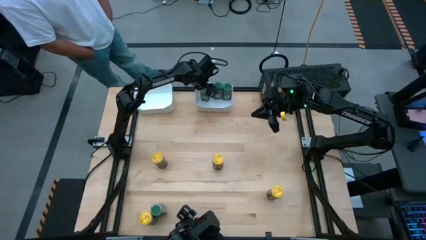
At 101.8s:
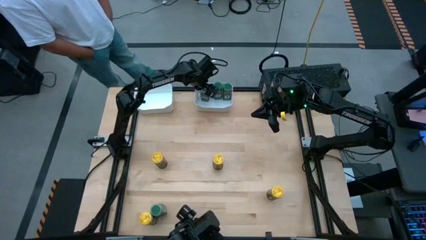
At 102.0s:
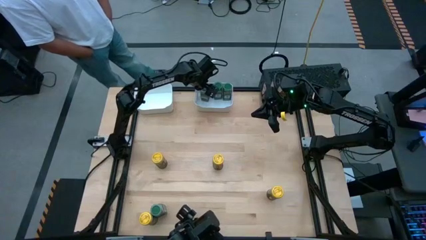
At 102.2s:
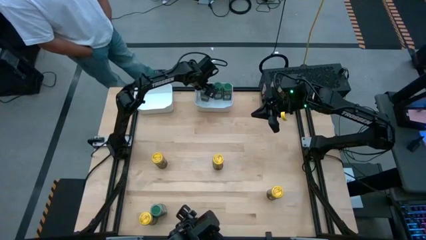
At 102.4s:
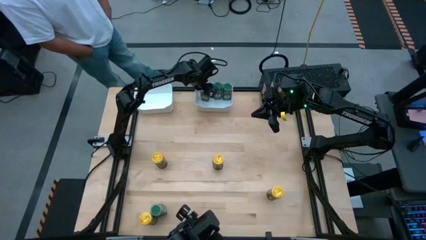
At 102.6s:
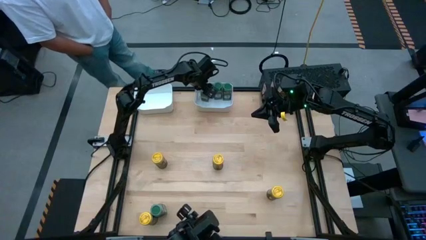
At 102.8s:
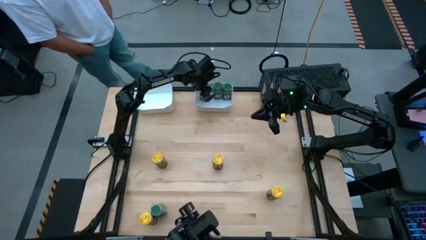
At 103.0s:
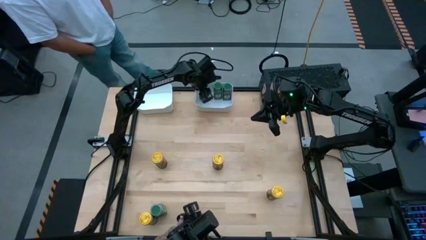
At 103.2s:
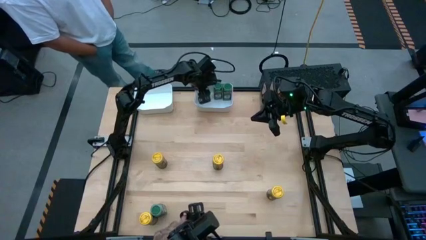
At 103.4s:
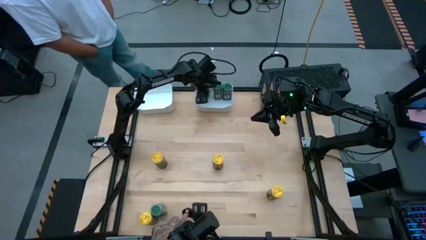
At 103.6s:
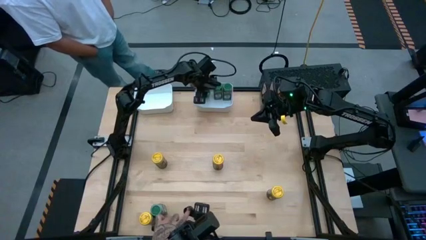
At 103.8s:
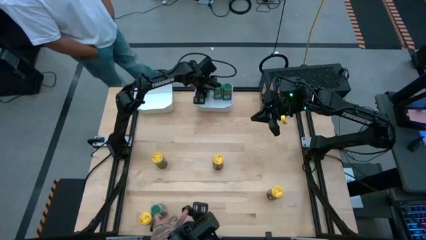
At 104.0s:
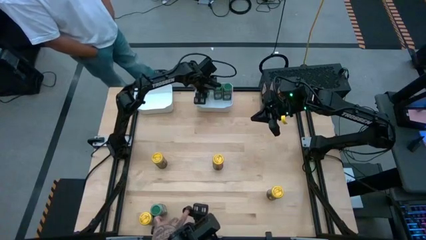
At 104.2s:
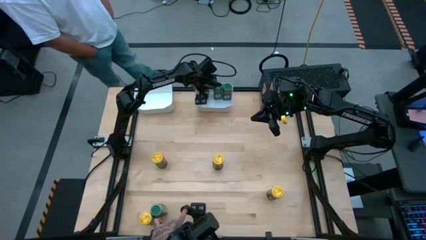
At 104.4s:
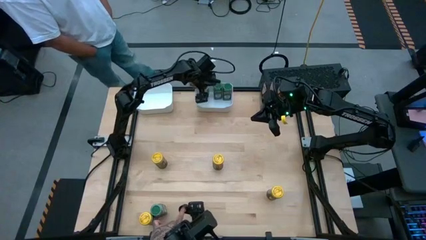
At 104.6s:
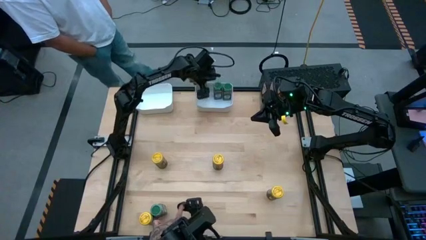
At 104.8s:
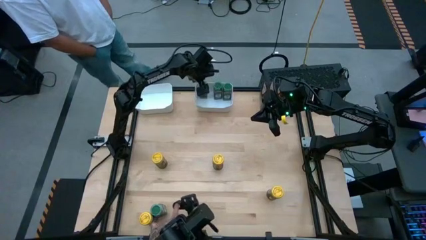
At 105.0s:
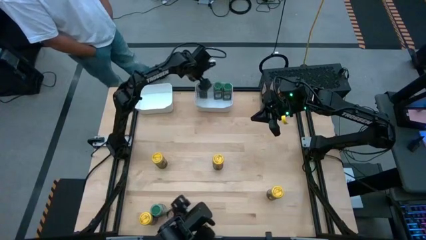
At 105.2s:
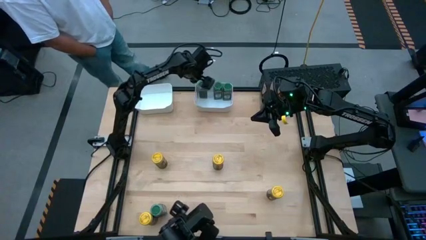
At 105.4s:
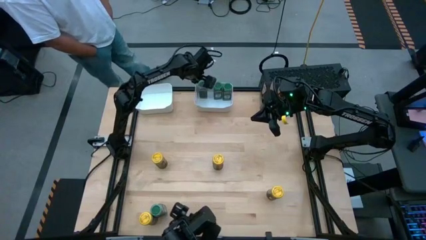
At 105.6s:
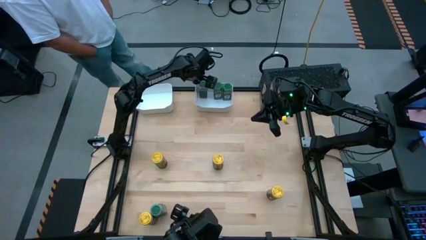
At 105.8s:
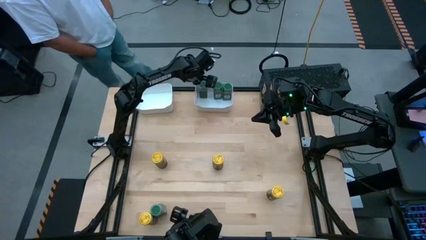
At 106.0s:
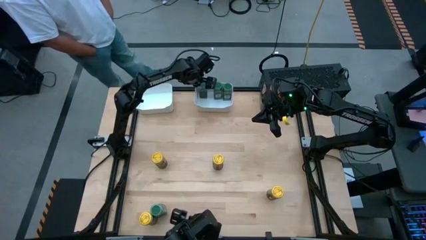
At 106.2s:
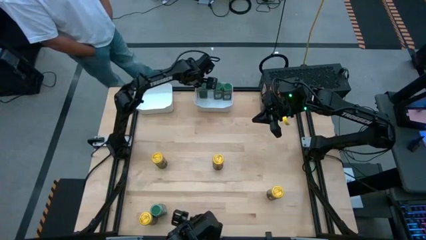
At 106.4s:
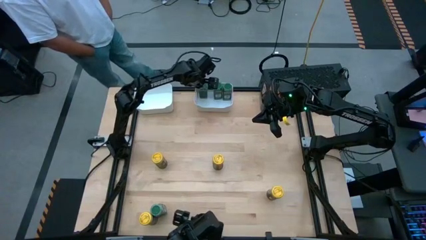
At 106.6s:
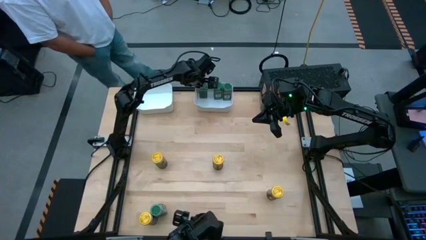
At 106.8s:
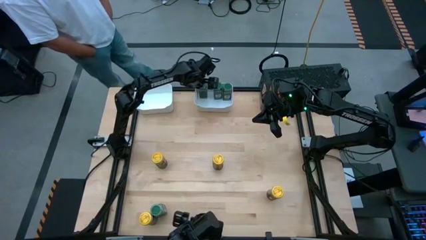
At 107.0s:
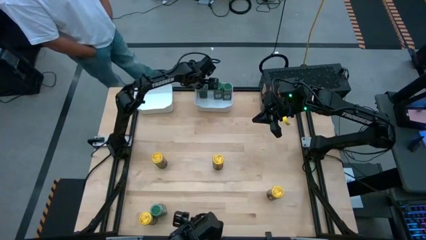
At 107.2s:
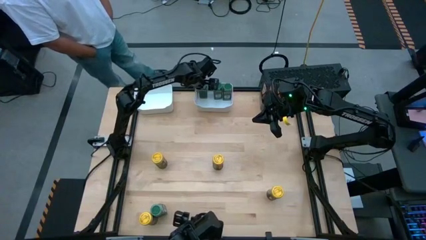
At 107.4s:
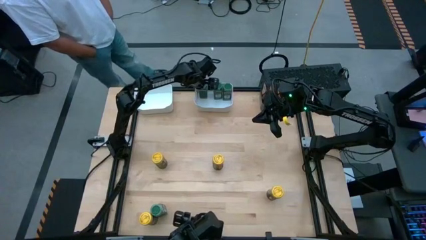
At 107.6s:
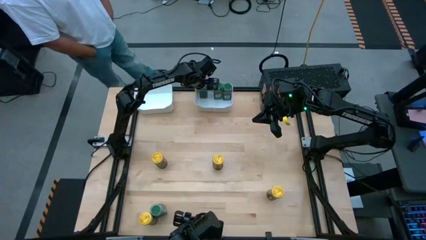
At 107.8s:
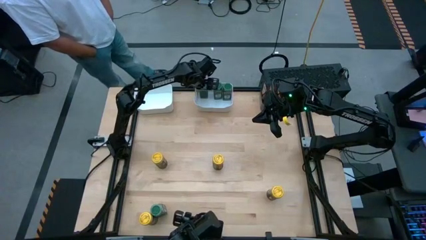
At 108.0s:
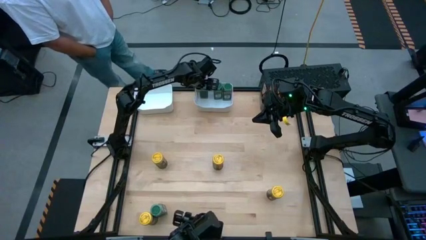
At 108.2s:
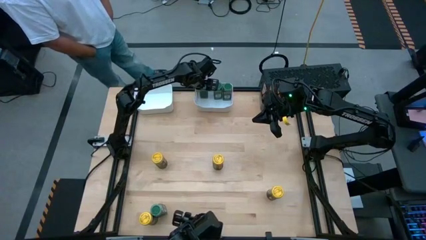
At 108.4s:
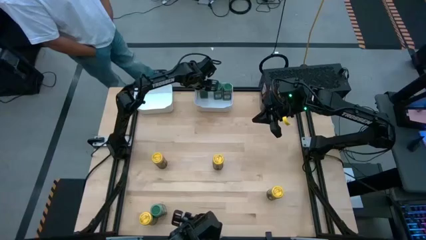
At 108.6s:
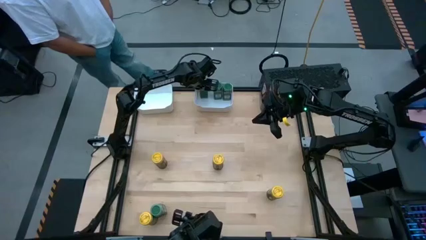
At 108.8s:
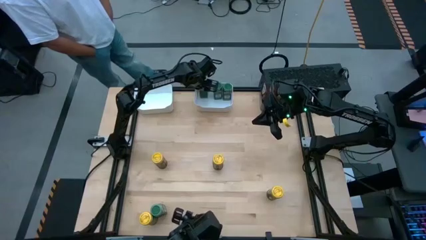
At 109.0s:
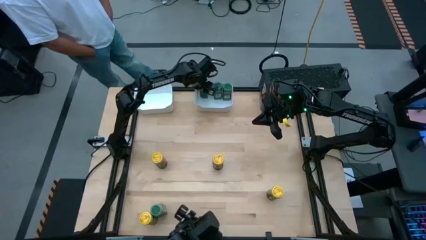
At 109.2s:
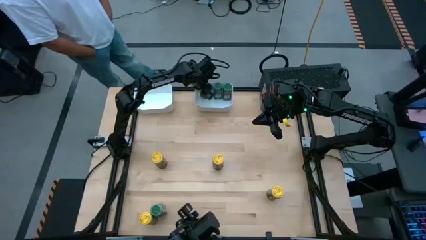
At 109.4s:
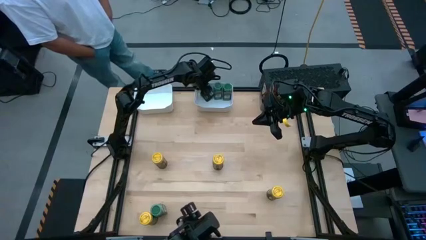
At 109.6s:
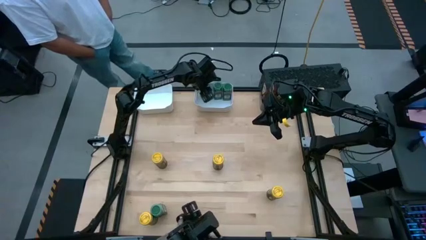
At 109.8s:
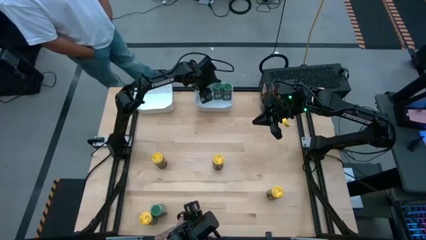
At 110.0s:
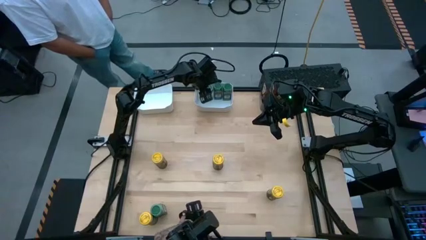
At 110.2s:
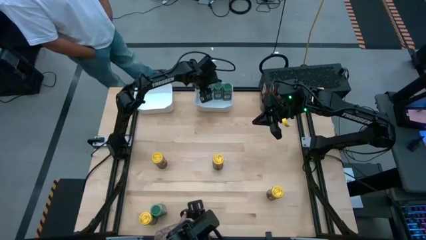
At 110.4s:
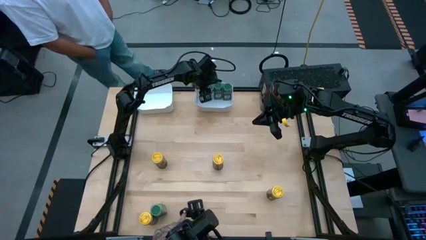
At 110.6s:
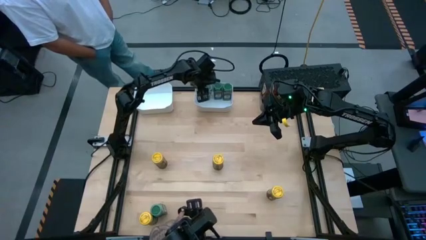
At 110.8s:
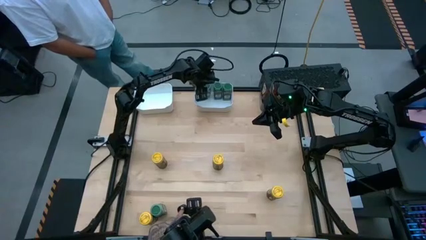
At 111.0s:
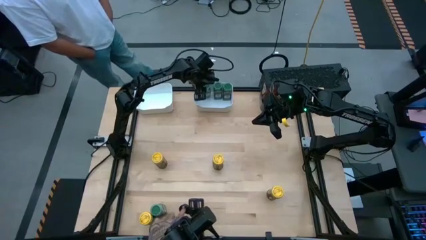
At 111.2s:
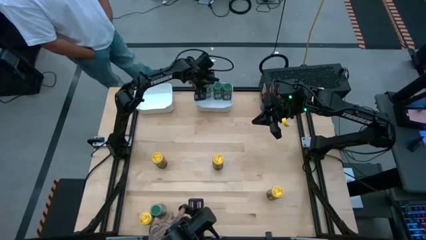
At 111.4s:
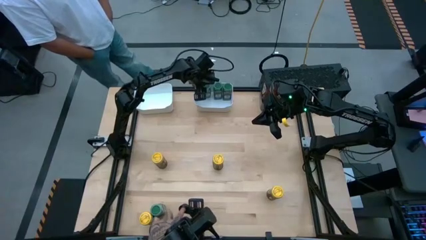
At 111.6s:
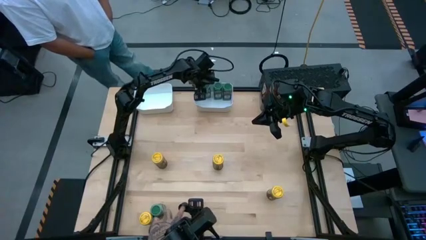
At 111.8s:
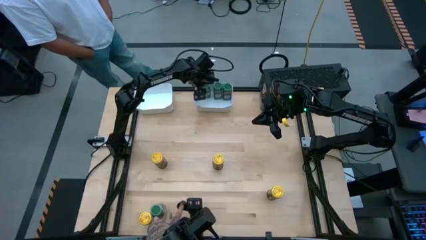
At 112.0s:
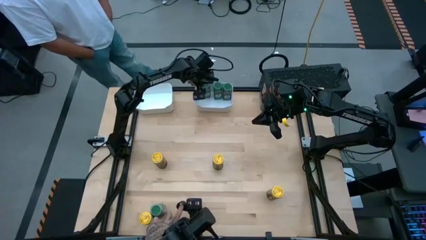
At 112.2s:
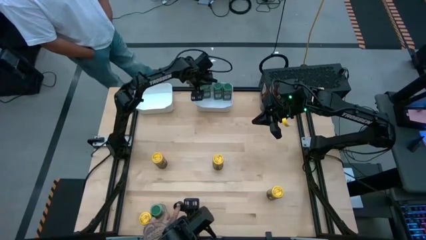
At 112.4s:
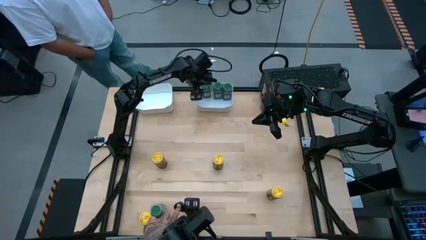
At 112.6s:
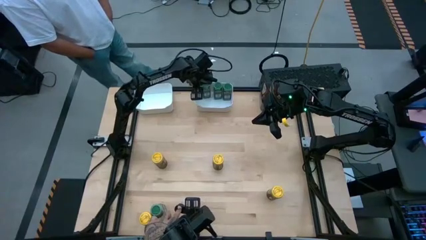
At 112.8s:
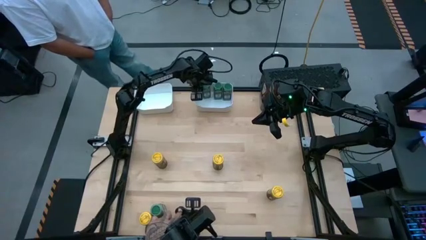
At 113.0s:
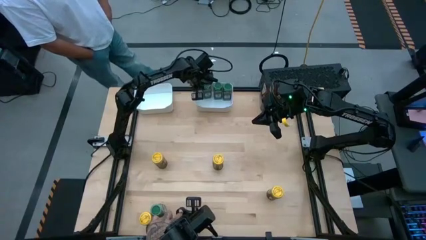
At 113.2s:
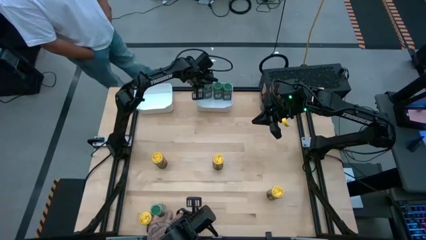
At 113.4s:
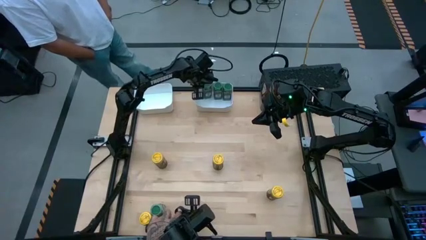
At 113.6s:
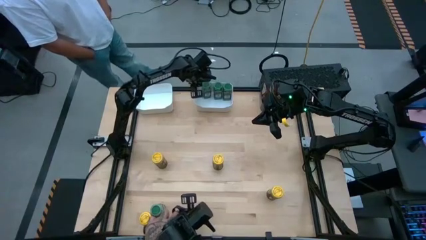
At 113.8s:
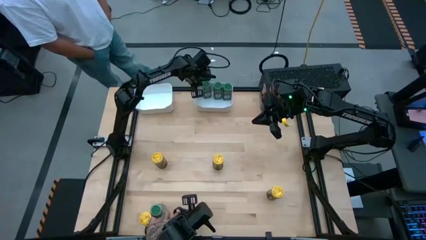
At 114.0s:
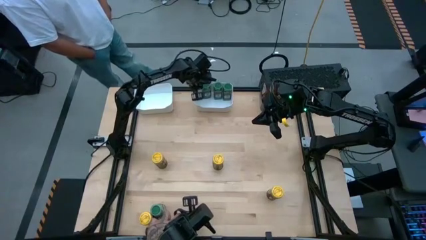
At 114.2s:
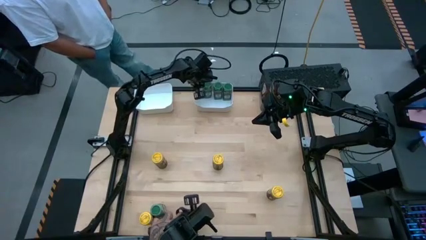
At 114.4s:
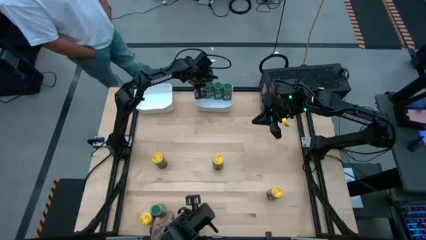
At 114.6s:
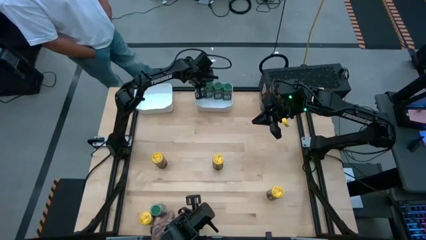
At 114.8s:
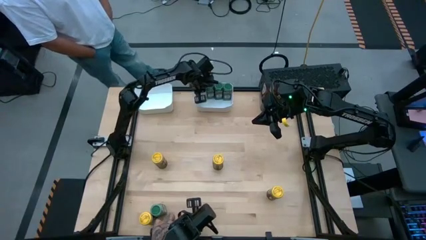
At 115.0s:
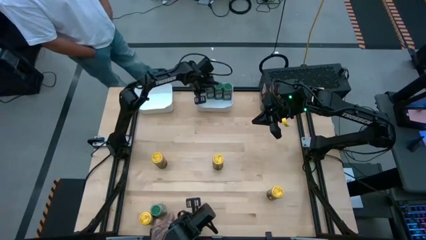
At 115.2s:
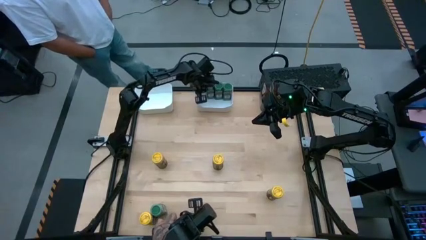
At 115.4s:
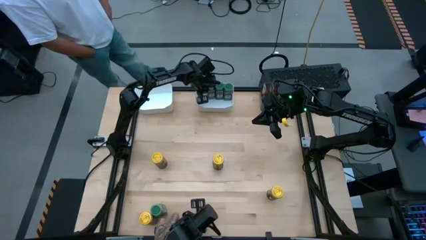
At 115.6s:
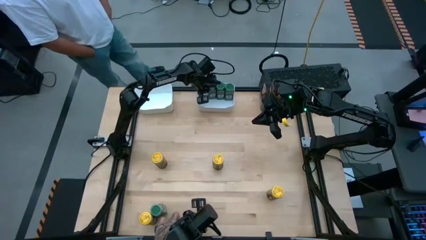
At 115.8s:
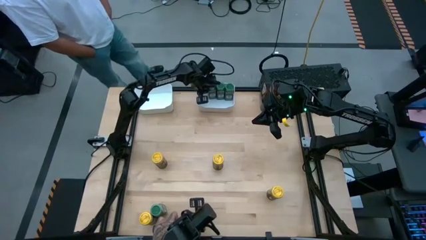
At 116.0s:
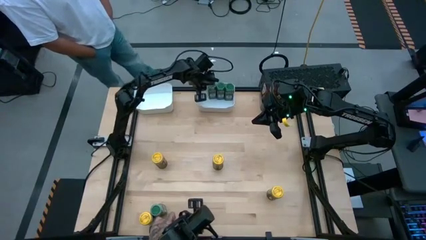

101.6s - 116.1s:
Task: Sort spices by type
Put the top green seasoning bottle into the right white bin

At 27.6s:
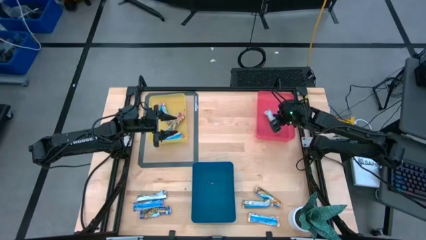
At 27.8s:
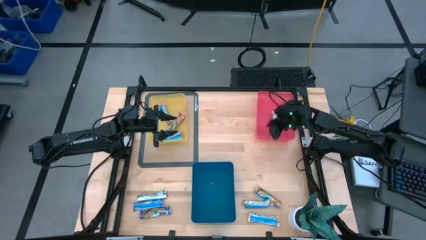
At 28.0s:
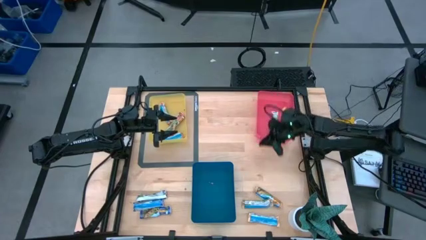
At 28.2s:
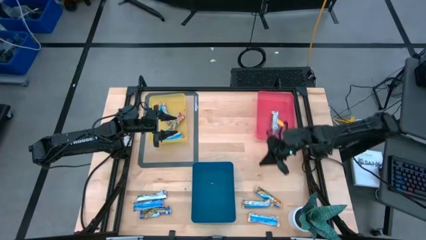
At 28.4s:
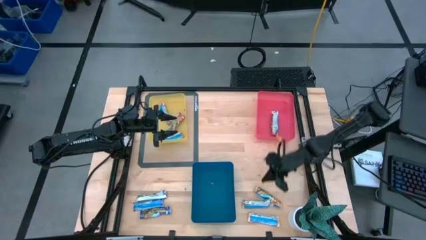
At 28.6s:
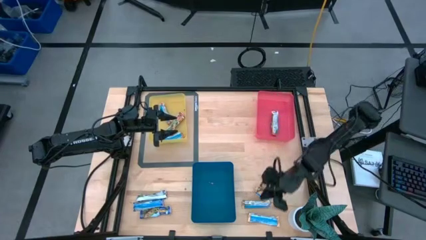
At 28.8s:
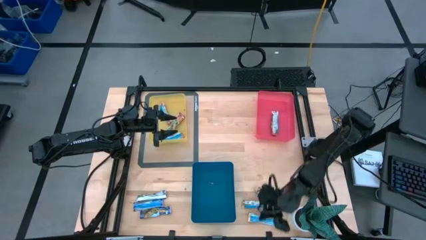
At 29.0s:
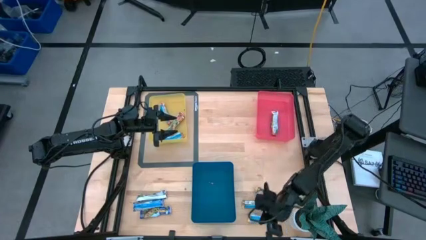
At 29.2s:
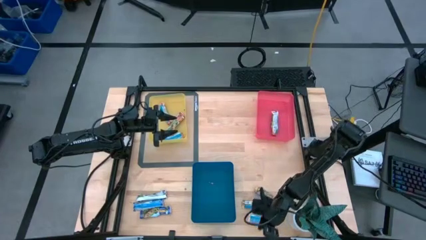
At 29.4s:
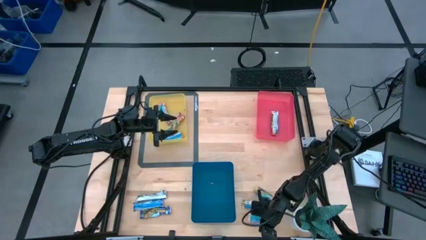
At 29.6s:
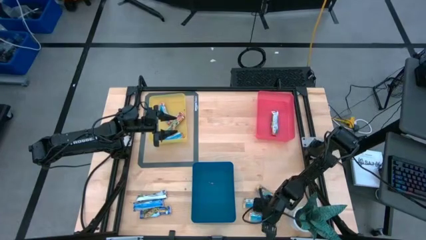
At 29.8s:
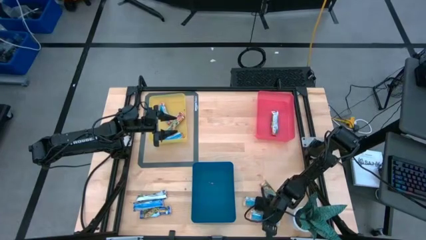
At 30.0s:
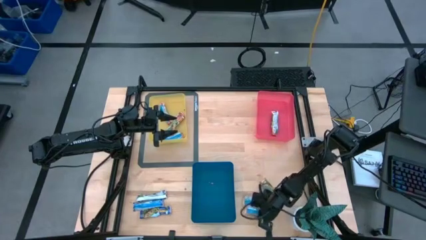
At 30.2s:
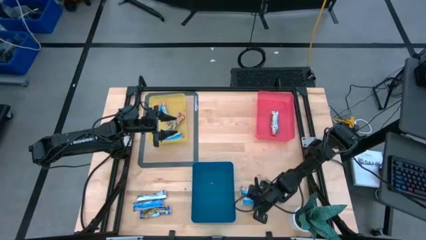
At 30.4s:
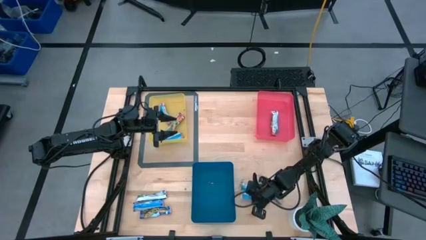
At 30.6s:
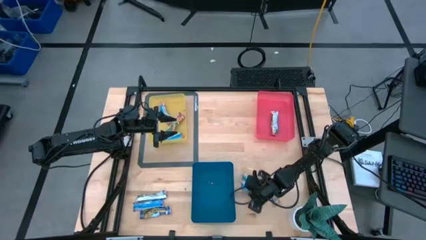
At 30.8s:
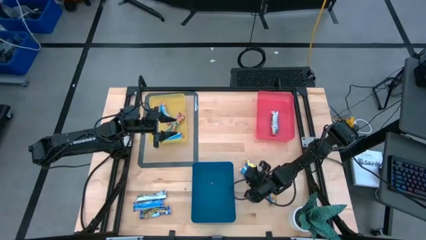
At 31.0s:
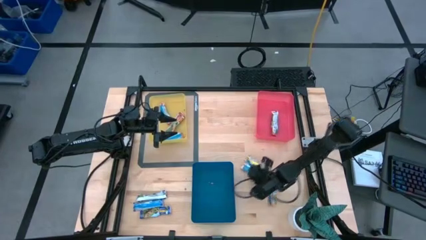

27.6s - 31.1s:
Task: Pick and place Granola Bars by type
Move the granola bars to the middle right of the table
